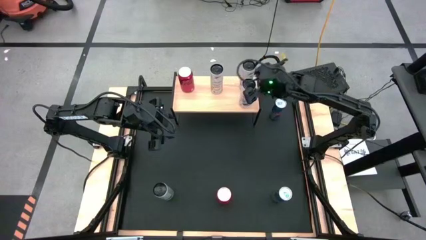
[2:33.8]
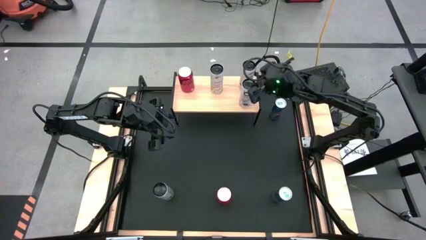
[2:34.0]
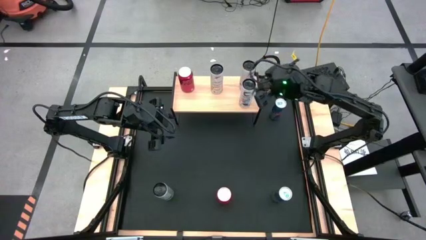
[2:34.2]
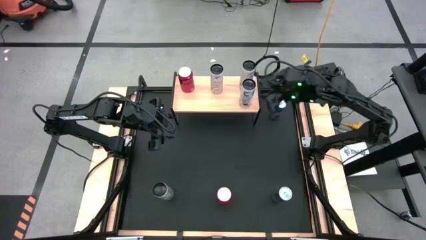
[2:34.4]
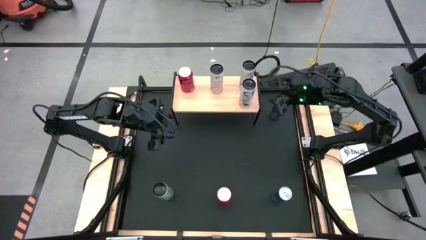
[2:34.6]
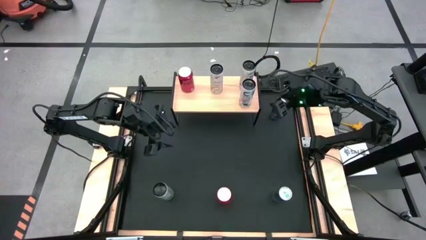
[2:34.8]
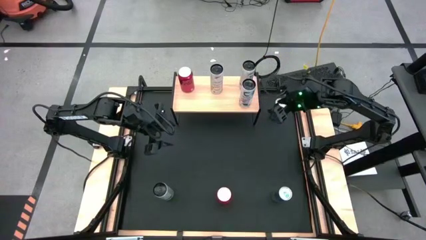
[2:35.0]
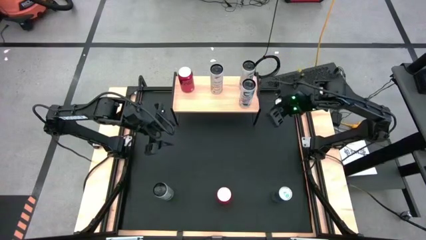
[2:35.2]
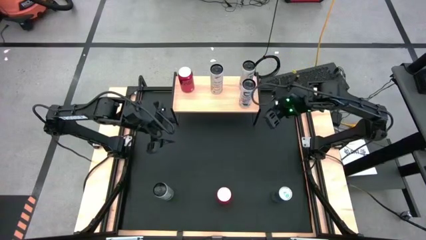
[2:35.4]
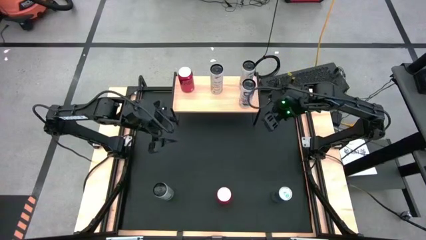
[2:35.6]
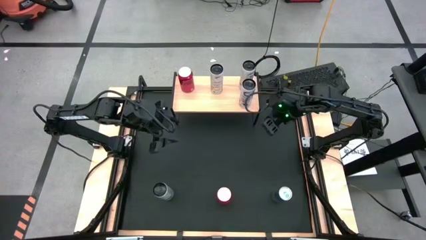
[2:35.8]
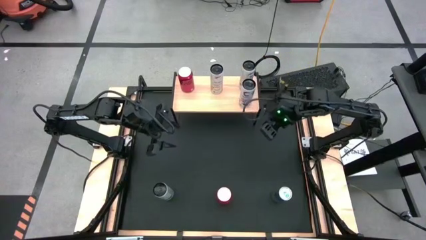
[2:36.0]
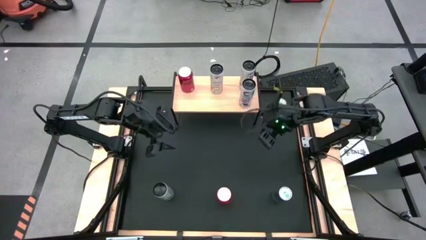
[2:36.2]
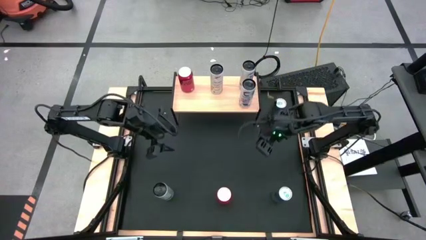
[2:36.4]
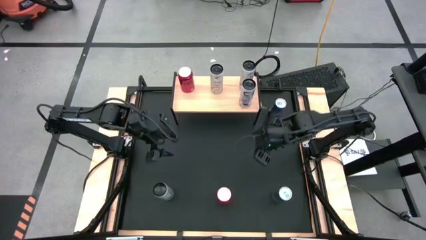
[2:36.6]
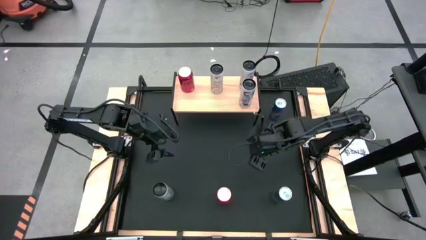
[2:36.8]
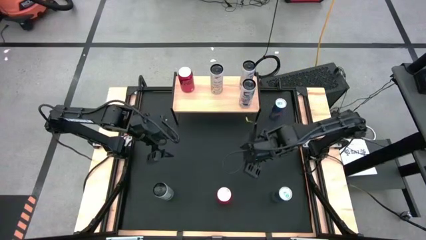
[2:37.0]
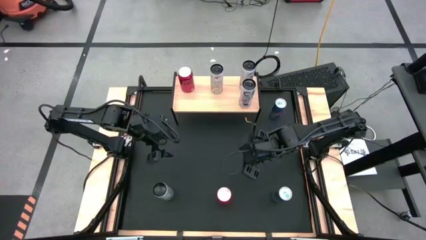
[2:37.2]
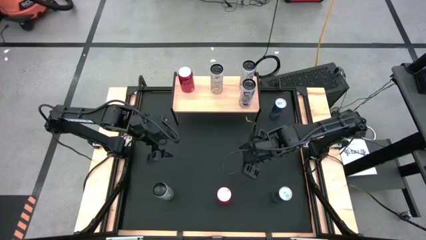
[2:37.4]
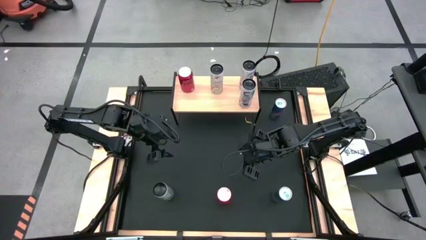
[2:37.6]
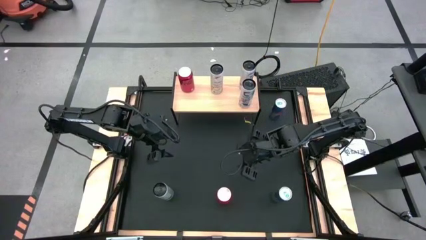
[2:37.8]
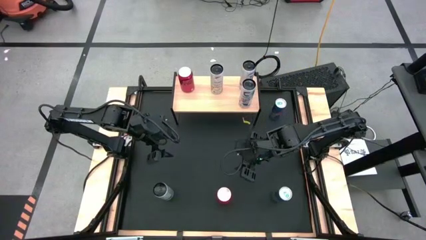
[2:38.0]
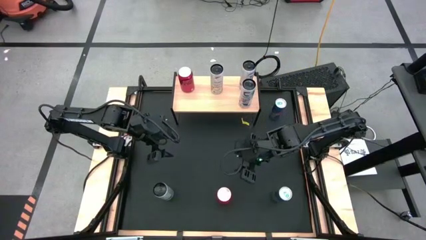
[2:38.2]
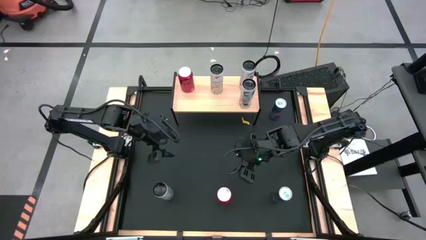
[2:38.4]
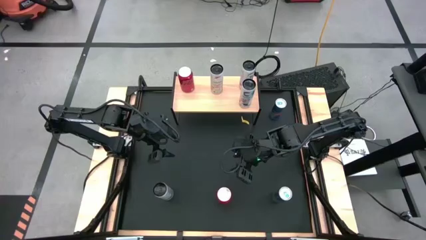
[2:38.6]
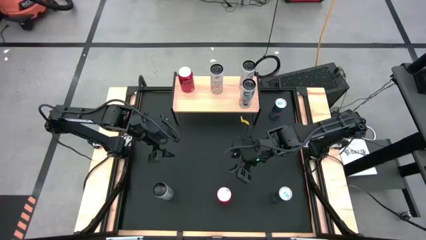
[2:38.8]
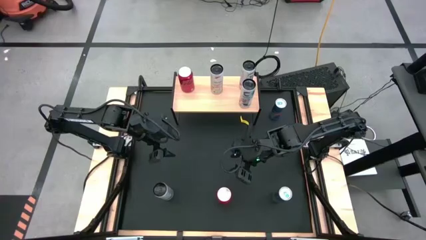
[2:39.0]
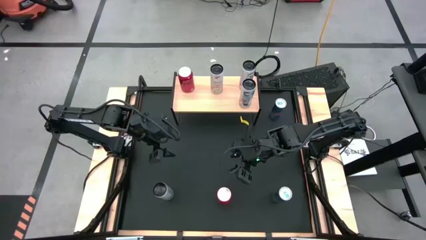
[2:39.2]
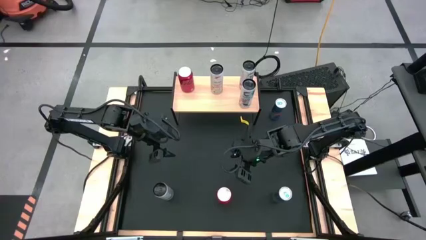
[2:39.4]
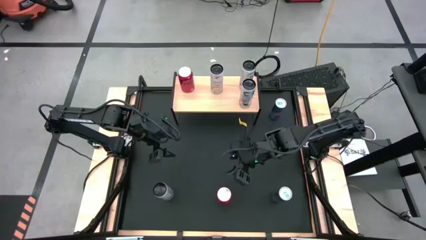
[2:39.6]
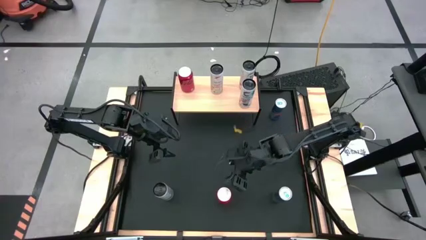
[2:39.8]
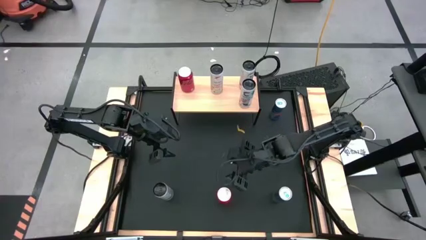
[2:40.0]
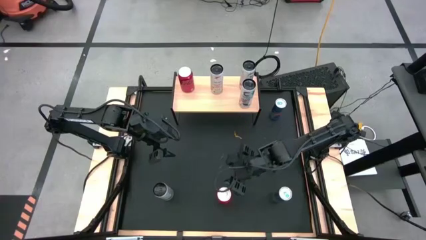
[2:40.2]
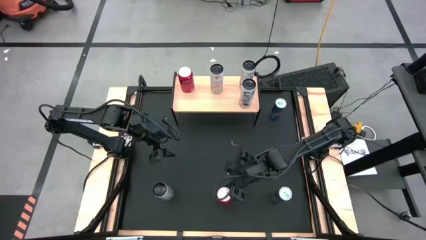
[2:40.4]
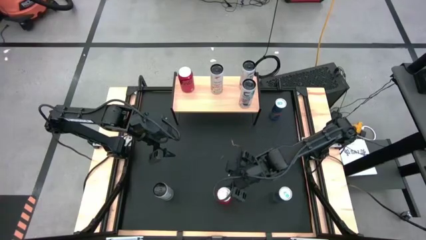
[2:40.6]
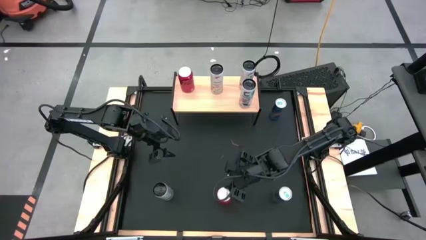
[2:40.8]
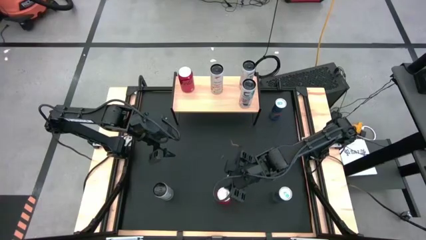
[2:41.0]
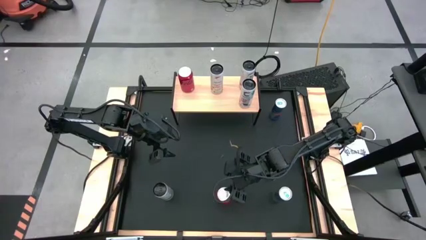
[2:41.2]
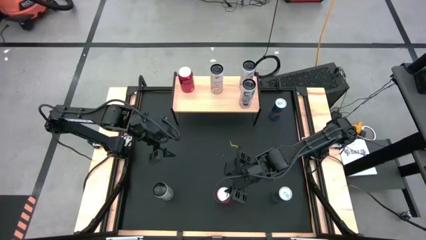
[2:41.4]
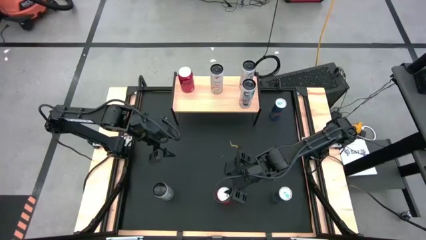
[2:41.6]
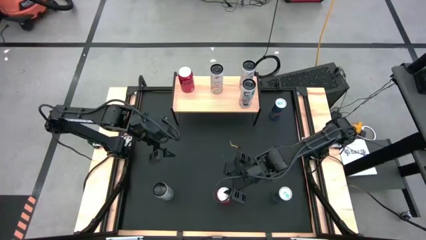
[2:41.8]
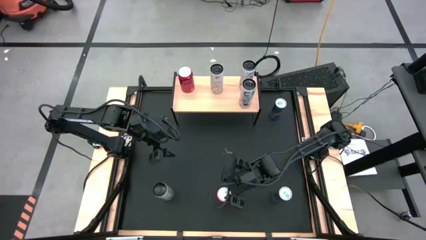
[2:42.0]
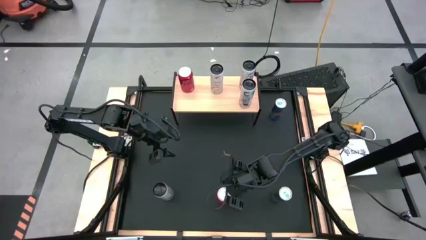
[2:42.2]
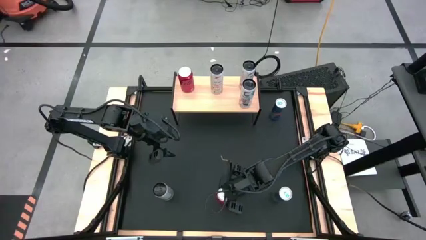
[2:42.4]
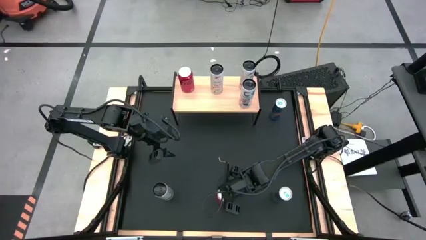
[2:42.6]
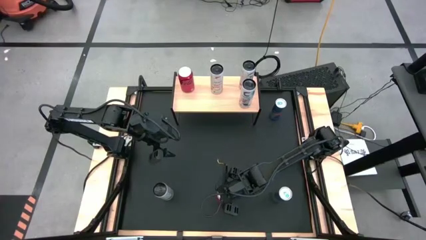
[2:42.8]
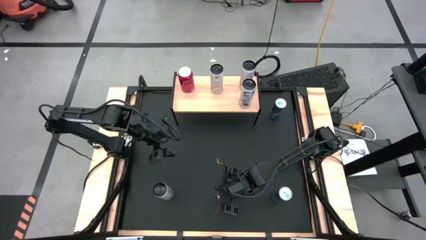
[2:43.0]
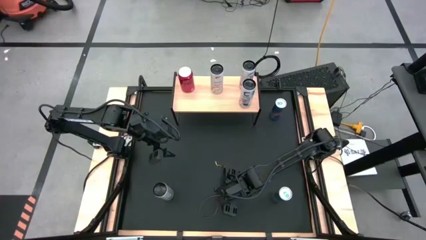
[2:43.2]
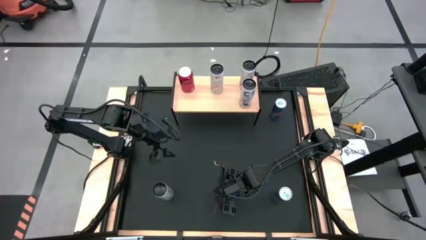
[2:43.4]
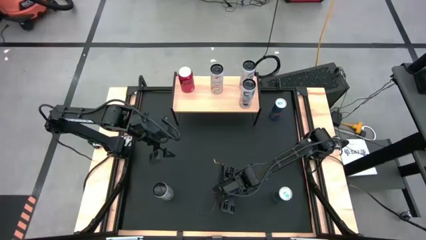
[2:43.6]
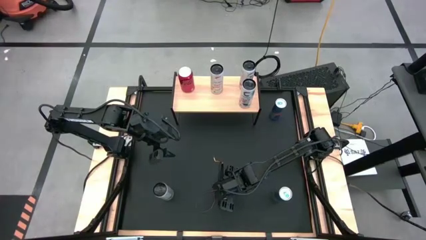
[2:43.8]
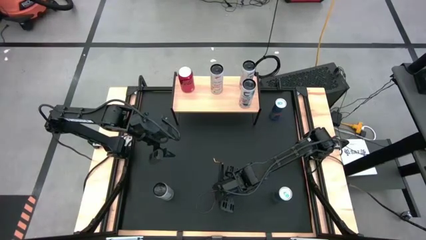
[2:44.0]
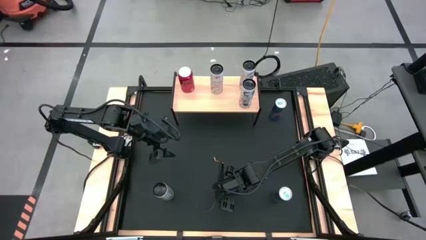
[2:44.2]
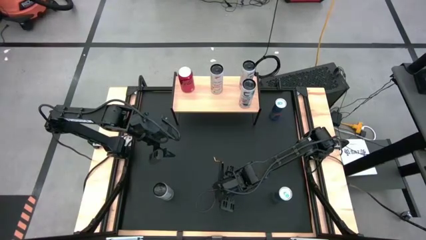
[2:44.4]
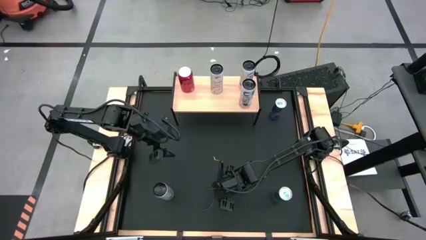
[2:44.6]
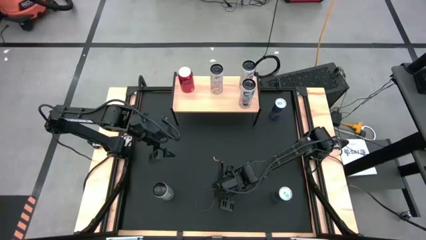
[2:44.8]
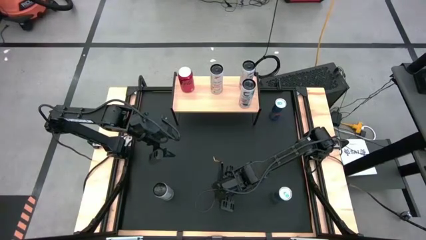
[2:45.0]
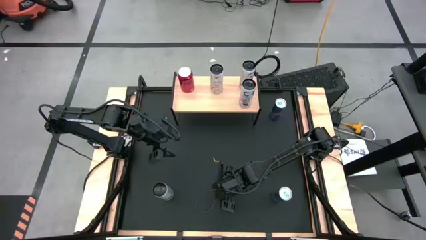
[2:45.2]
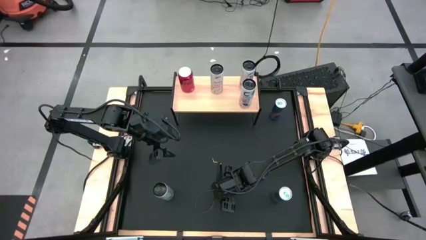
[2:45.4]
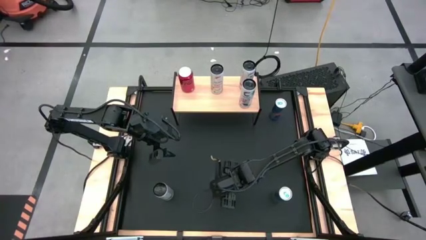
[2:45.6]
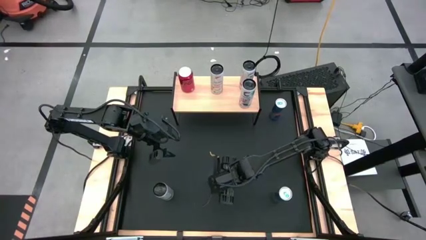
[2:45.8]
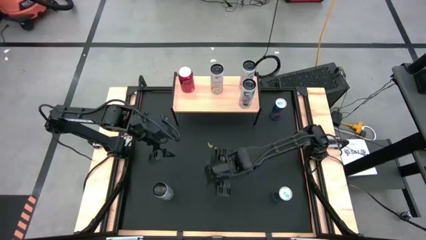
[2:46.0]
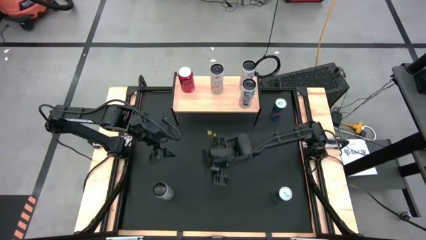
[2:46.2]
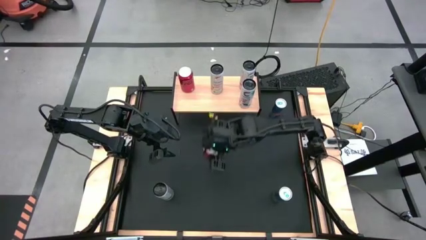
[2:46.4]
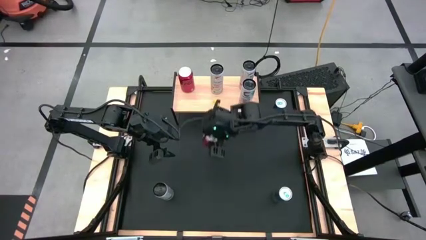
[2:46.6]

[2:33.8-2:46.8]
Task: Place canned beverage on shelf
Put the red soda can on the shelf aligned with the other red soda can

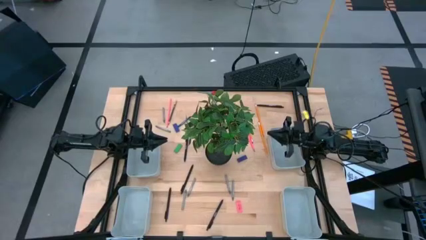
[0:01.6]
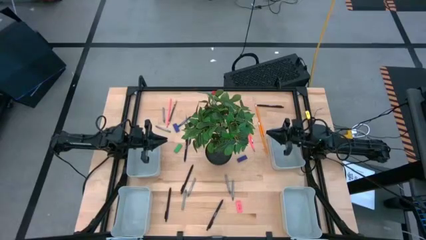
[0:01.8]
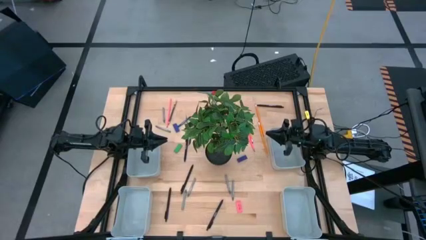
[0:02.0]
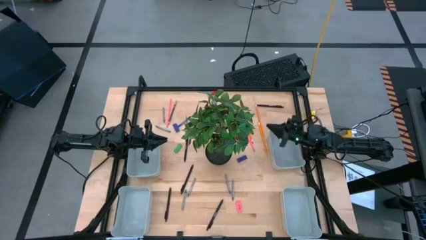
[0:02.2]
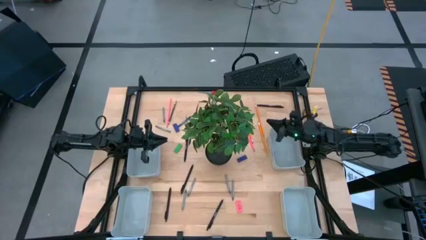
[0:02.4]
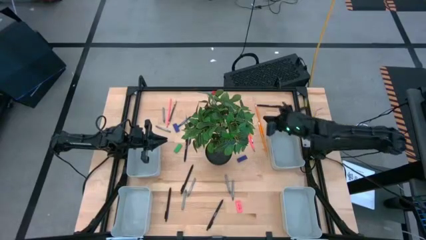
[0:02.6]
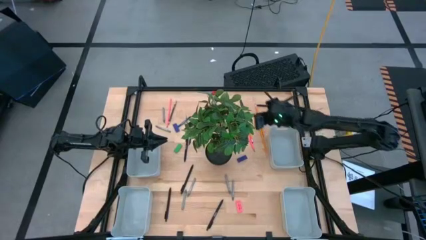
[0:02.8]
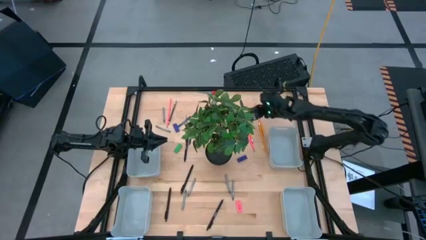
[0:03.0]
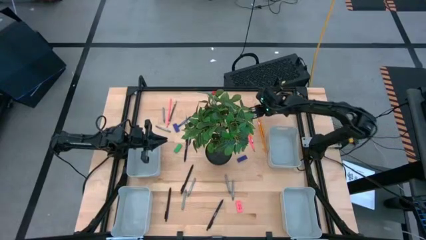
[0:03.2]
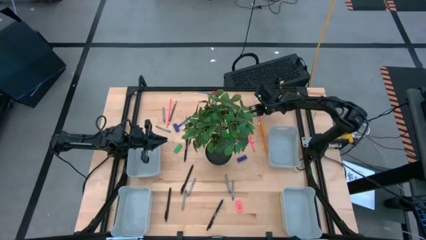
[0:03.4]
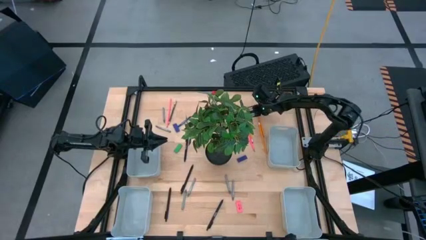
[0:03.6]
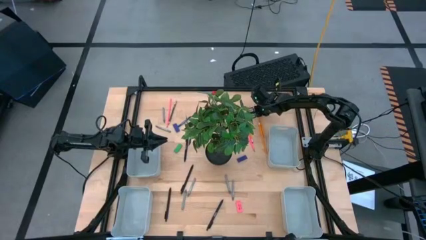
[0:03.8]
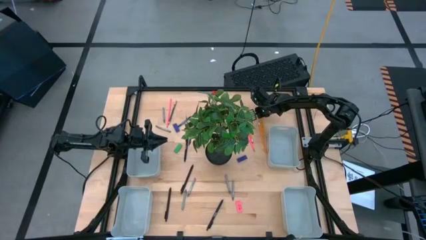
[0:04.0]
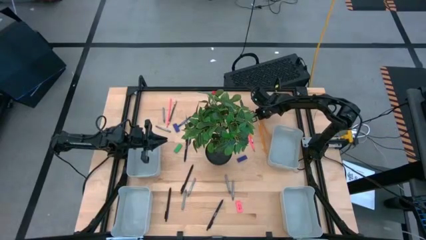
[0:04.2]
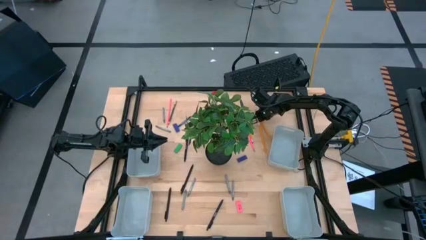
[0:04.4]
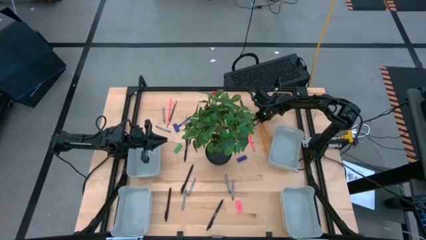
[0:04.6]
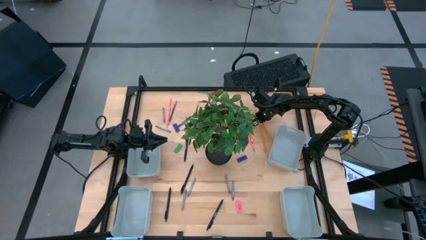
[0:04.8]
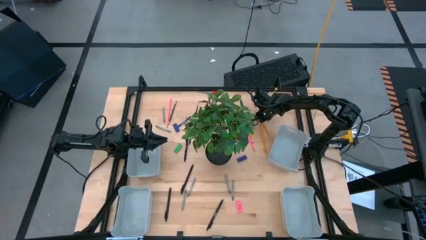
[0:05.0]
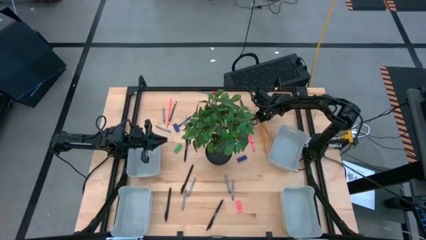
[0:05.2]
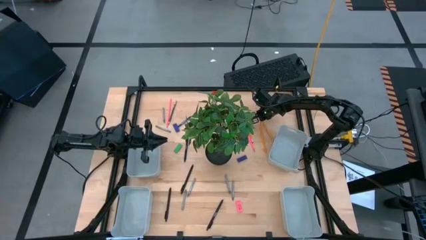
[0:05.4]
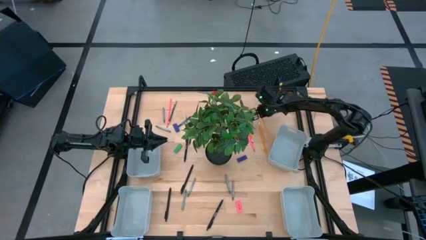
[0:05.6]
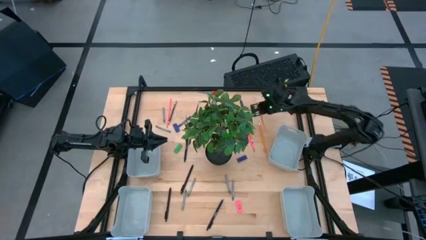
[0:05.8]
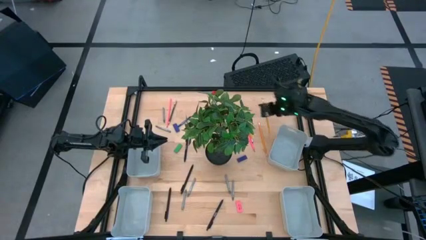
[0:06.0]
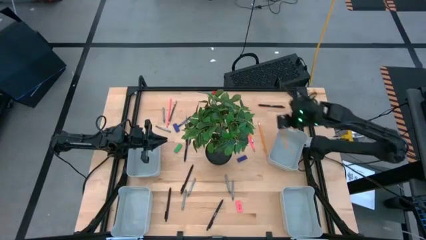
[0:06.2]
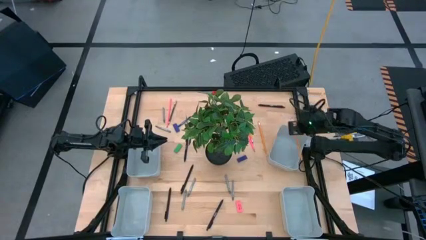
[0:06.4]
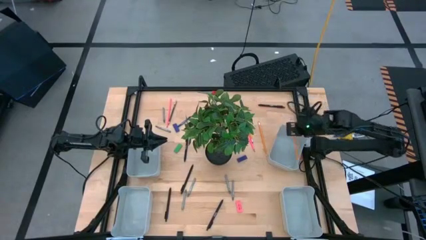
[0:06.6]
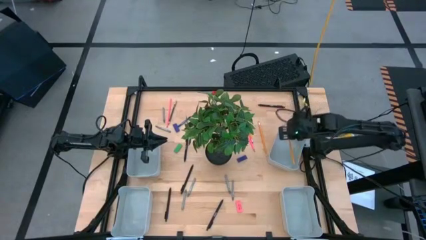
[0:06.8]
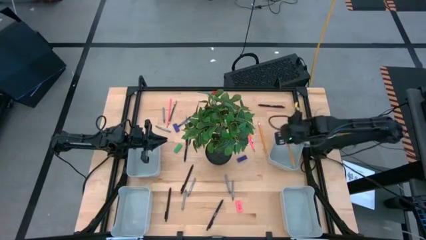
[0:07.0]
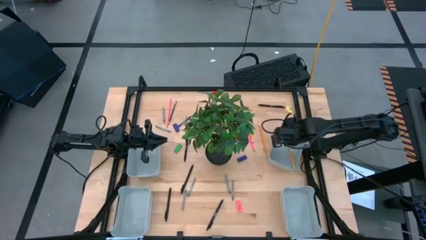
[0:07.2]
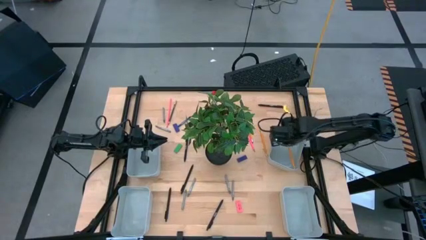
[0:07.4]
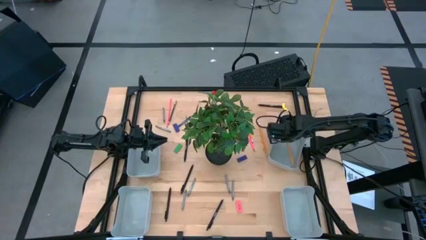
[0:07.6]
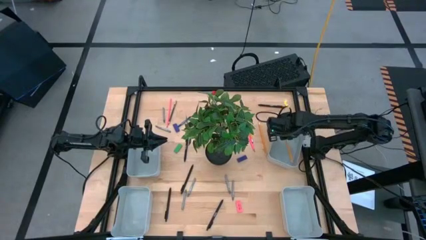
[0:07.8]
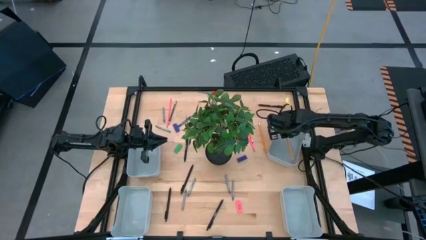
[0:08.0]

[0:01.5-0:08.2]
Task: Sort crayons/erasers/pens/pencils in bins
Put the orange pencil into the top right gray bin
